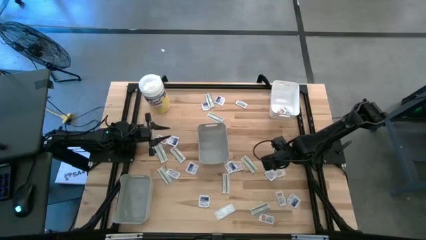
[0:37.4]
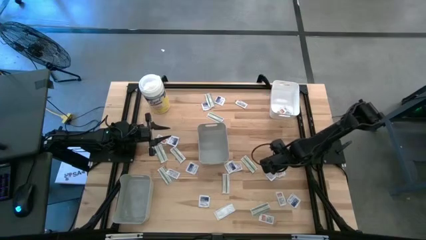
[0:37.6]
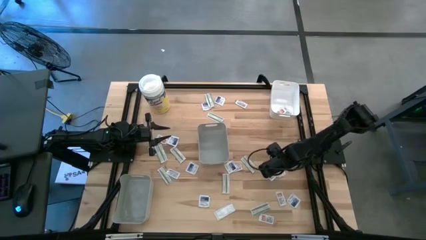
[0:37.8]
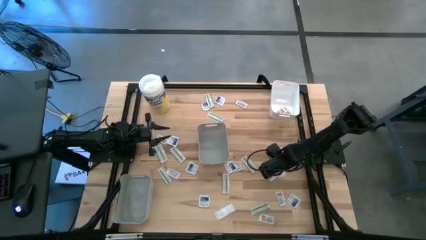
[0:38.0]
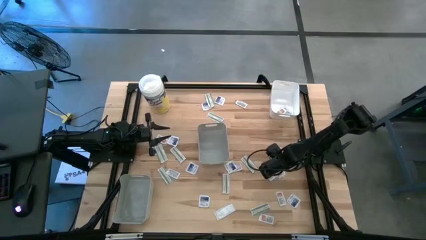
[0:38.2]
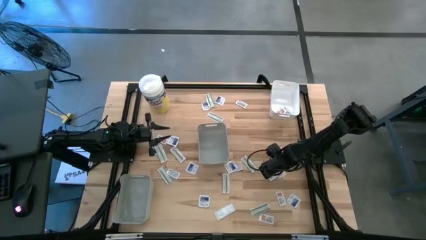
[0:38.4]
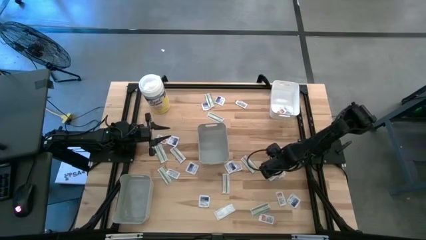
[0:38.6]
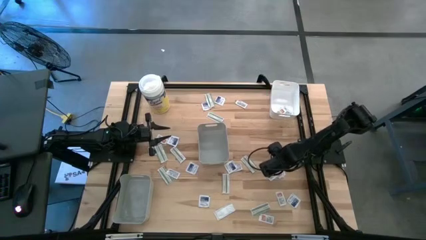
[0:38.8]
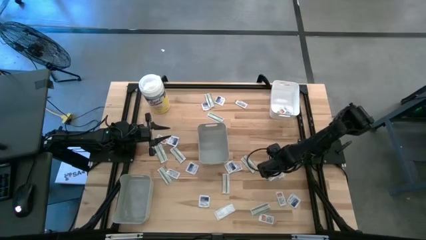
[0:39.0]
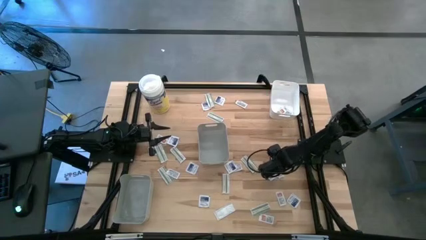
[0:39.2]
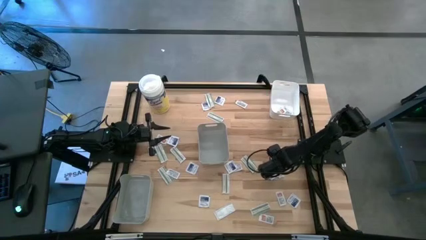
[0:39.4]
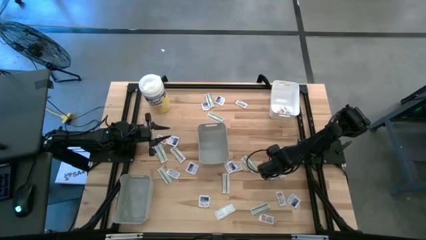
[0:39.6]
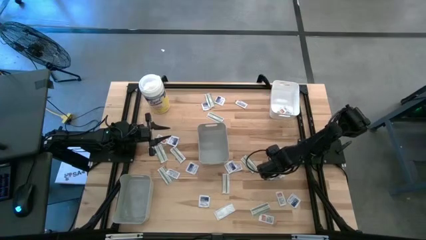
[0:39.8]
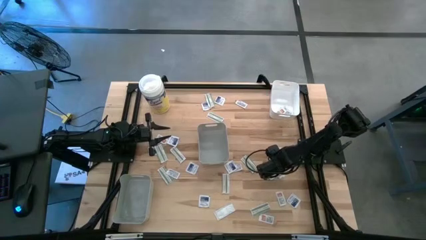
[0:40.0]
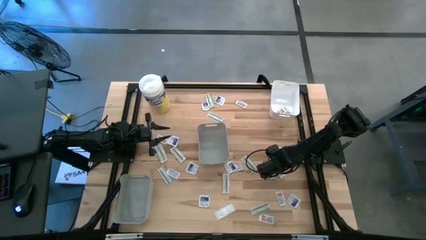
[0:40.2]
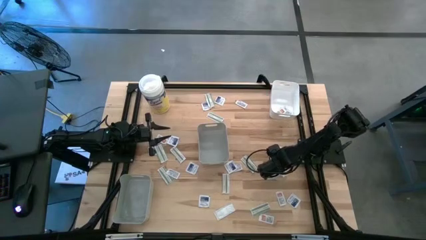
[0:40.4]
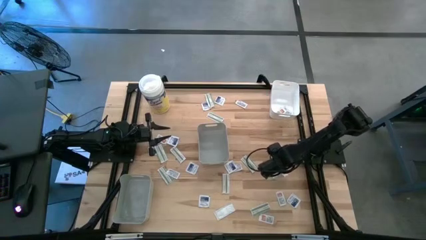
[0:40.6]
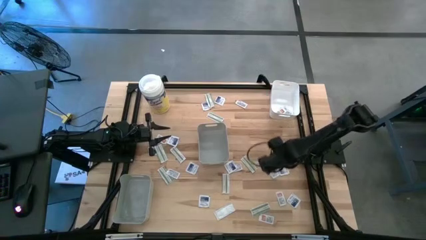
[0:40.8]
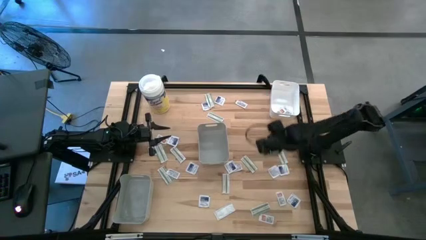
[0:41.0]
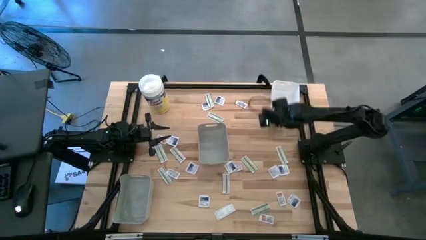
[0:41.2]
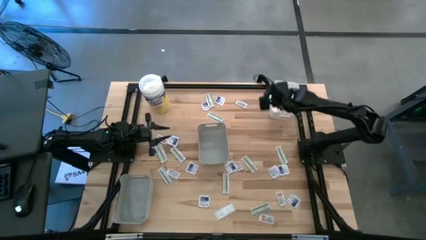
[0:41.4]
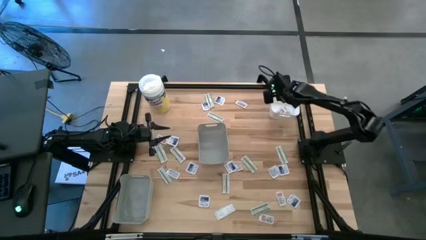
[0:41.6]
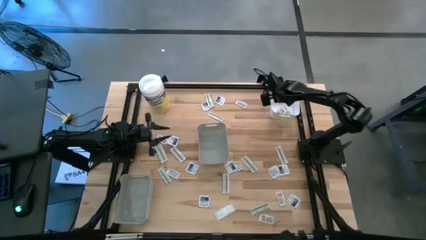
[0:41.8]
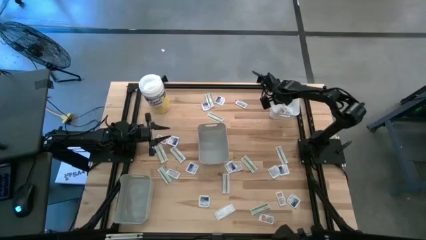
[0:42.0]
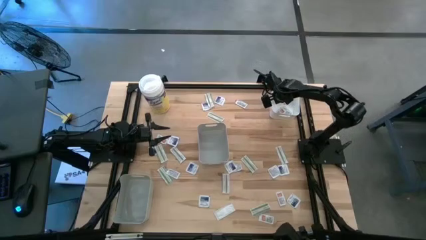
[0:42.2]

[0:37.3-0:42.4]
Task: Pick & Place First Aid Supplies
Put the orange pad into the white bin

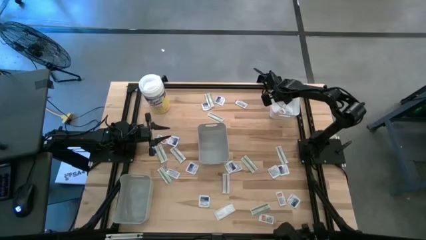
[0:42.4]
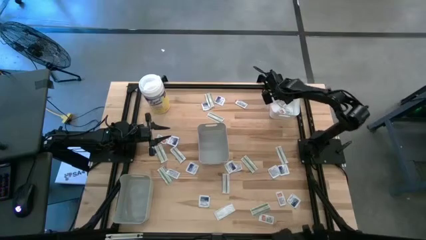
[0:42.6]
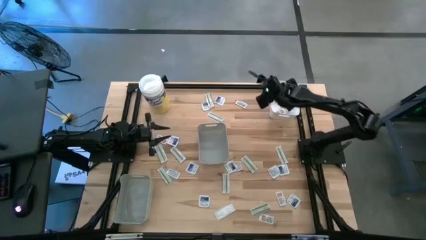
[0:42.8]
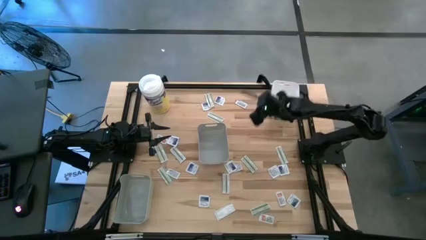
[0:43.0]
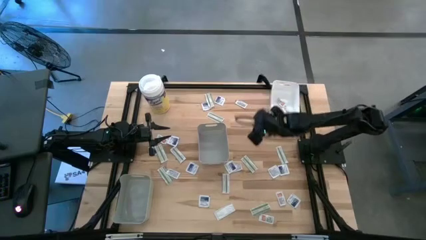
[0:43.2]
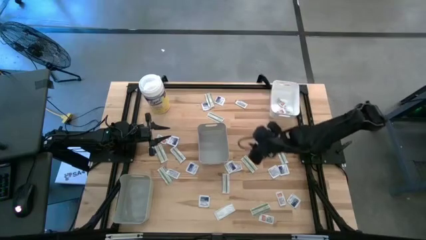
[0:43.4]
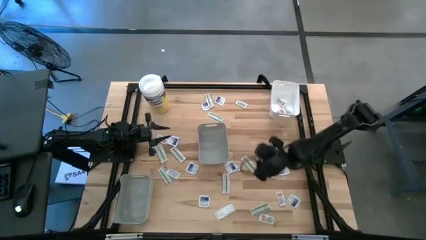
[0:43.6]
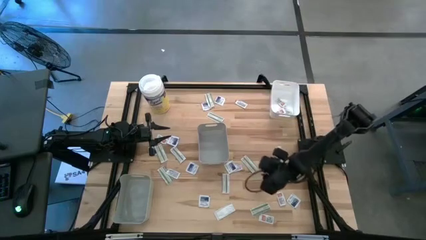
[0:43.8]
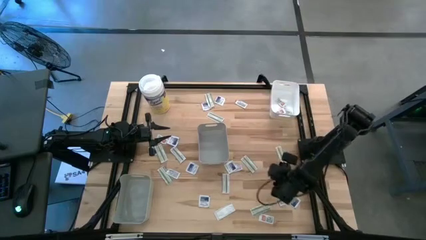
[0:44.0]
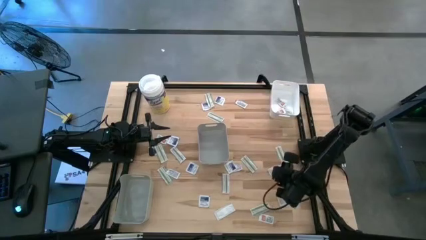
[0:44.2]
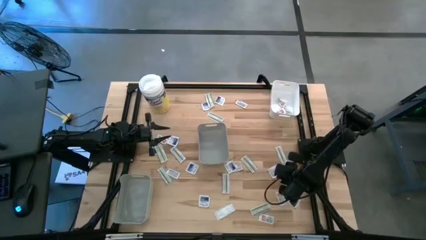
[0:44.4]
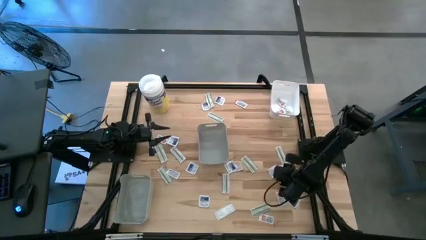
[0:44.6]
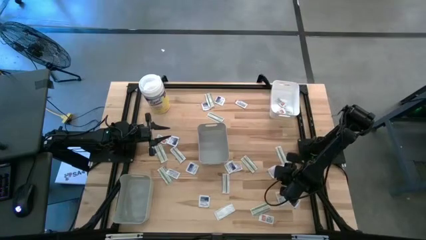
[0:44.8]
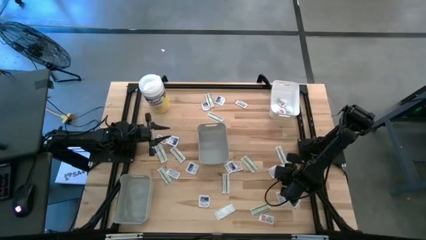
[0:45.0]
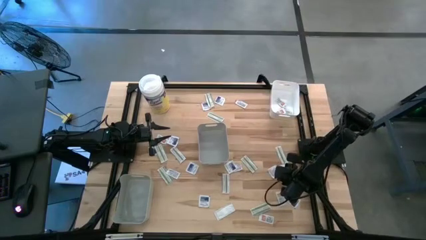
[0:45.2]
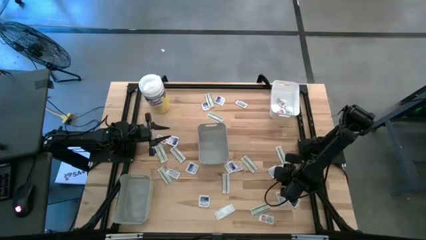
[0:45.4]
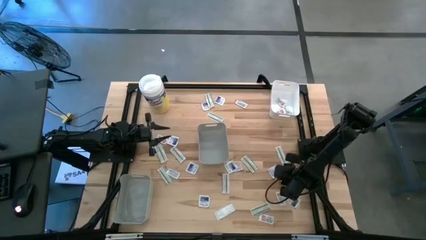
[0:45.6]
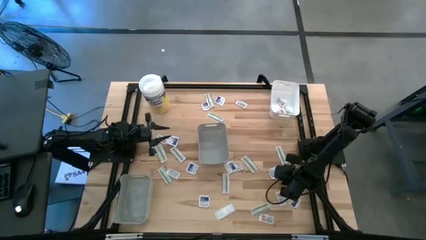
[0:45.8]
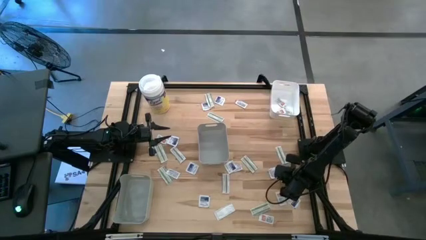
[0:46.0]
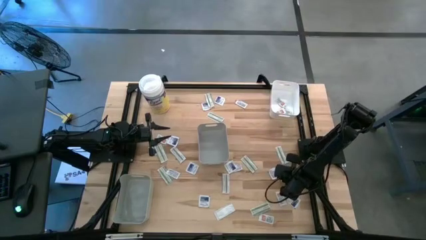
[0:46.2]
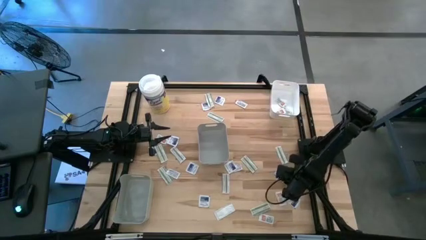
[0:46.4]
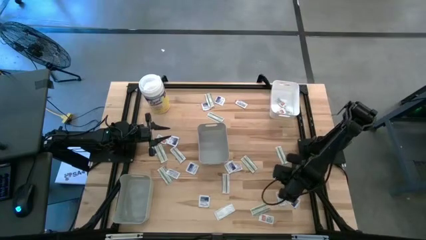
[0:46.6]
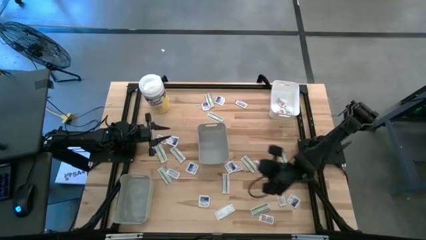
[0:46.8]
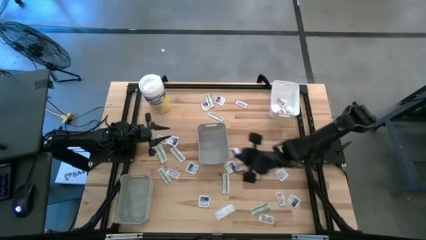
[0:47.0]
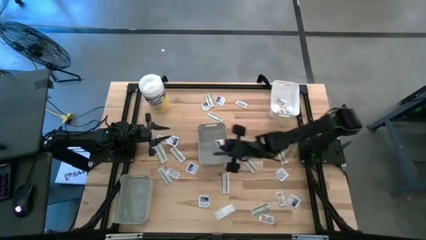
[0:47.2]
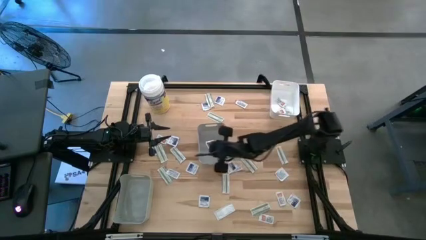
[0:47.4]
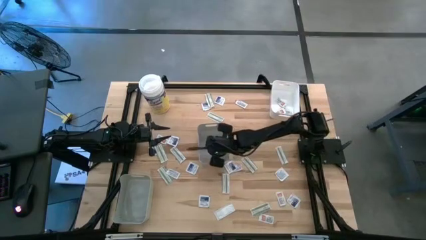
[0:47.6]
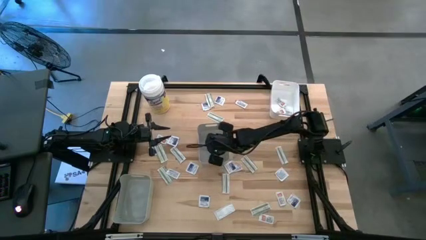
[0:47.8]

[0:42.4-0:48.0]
Put the blue pad into the middle gray bin

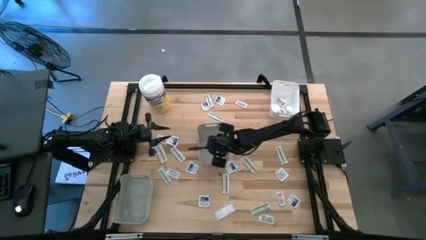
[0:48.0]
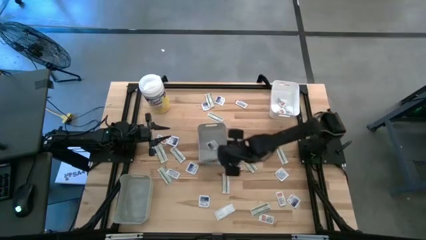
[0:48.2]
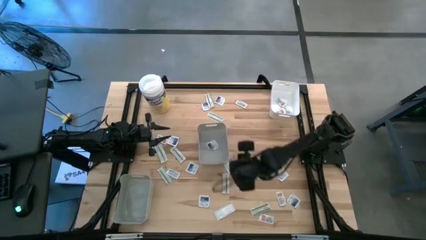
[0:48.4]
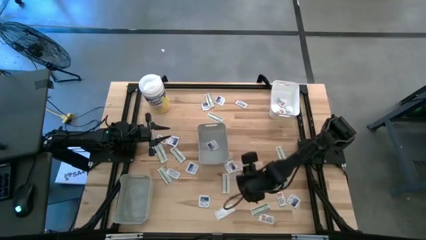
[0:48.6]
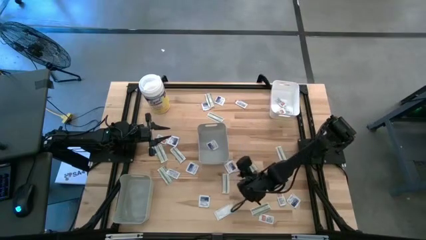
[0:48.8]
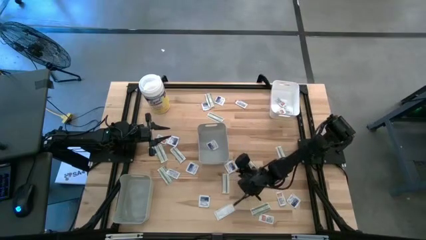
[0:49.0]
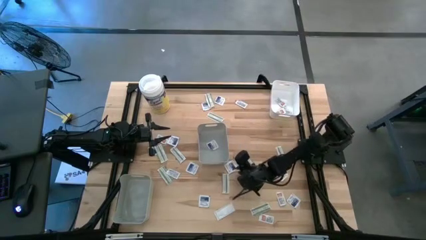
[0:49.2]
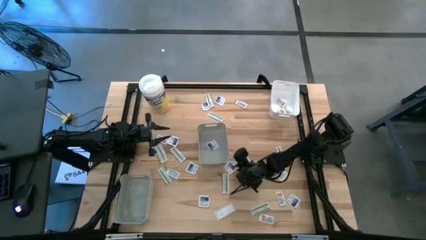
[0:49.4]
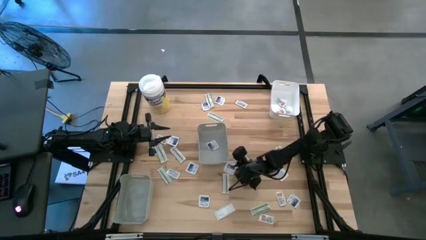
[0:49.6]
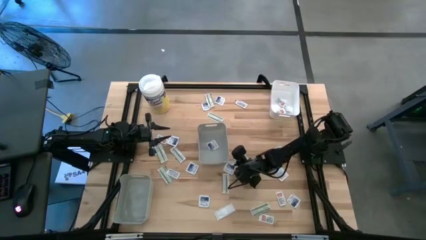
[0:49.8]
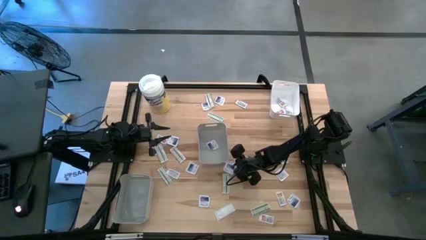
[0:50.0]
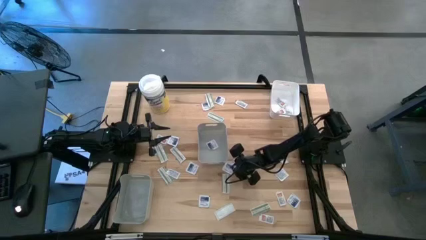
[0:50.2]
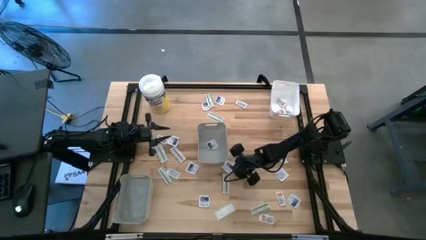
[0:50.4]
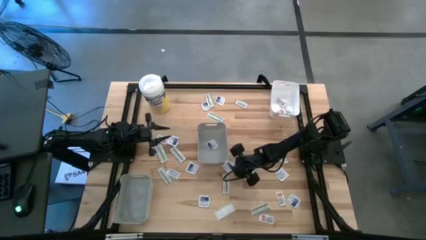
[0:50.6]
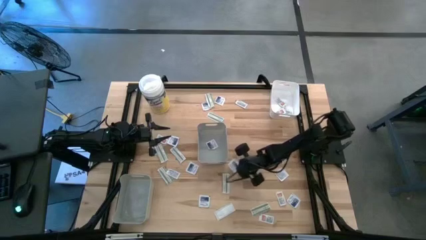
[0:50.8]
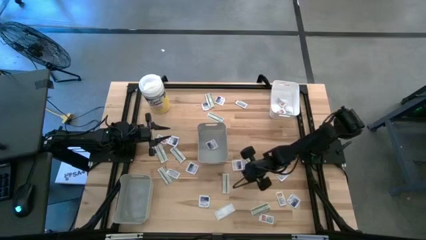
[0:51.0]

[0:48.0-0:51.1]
Put the blue pad into the middle gray bin

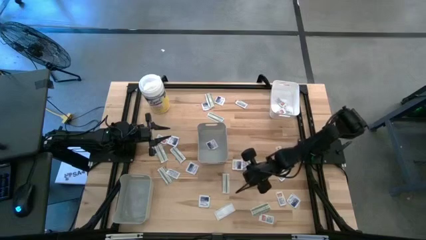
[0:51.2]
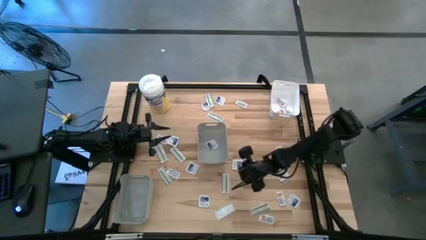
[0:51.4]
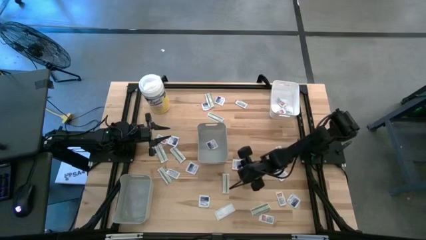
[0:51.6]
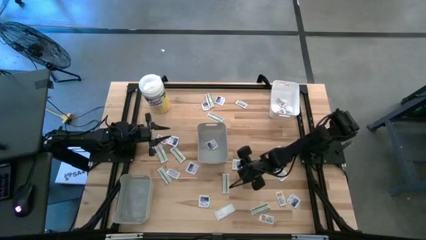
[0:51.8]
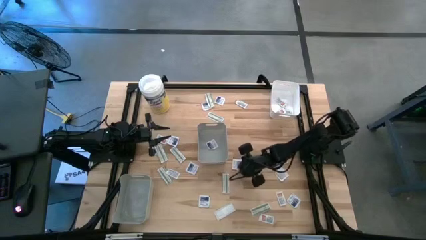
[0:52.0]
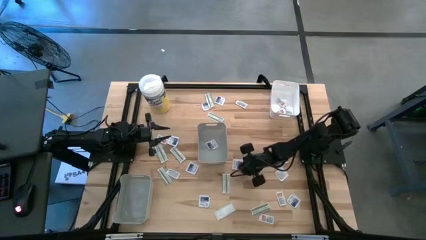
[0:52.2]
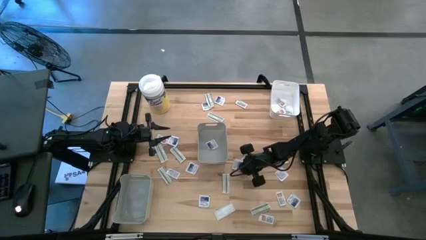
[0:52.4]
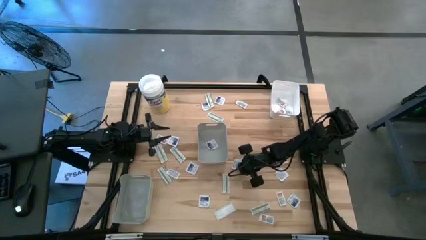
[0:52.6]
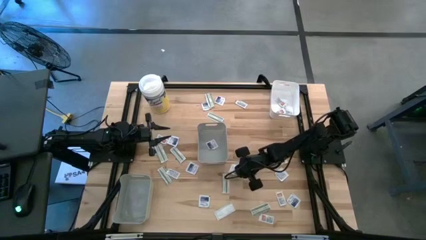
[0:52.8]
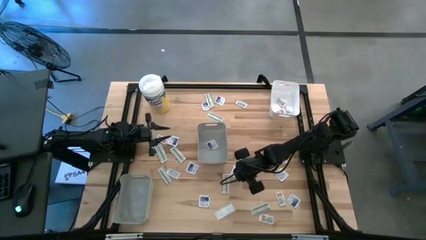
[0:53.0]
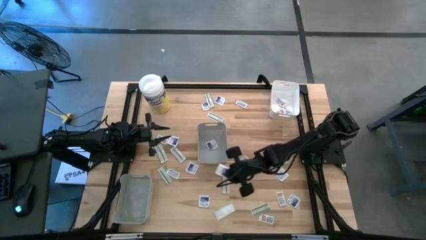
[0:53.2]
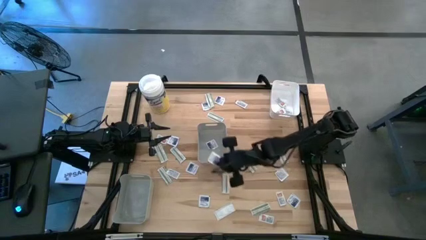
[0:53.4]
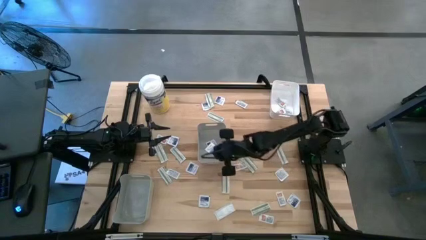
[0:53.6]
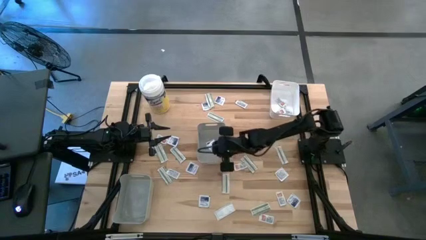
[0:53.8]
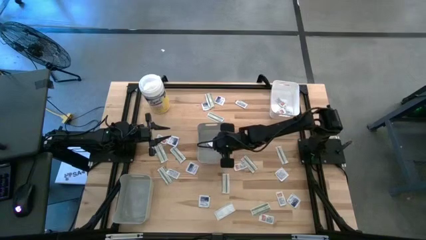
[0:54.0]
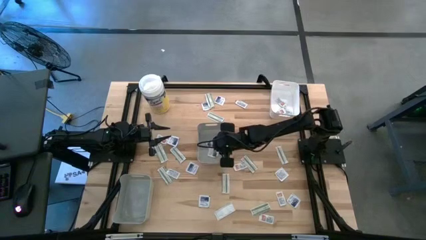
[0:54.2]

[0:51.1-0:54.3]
Put the blue pad into the middle gray bin
